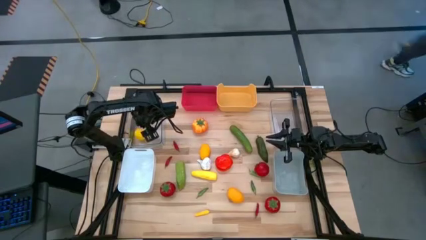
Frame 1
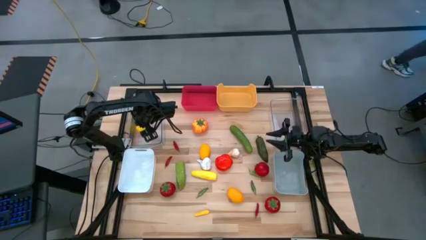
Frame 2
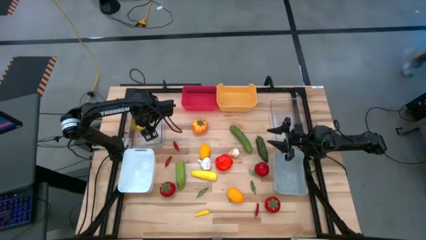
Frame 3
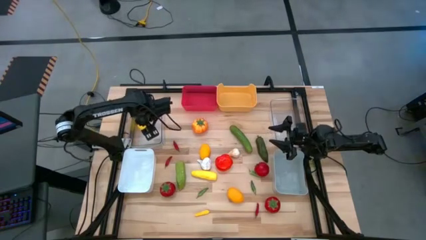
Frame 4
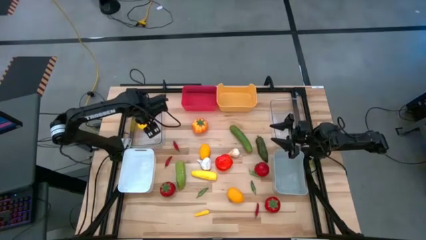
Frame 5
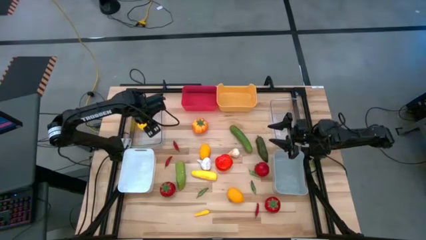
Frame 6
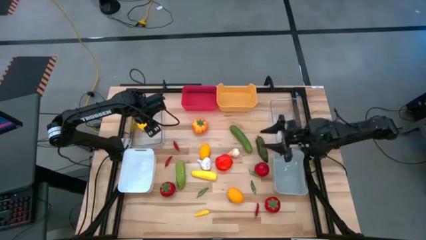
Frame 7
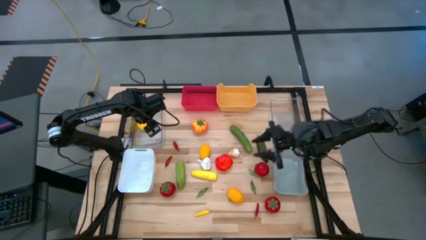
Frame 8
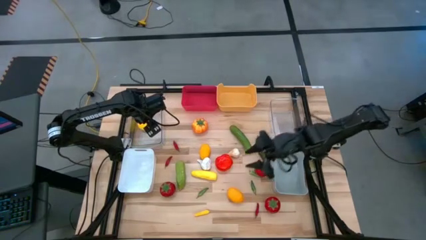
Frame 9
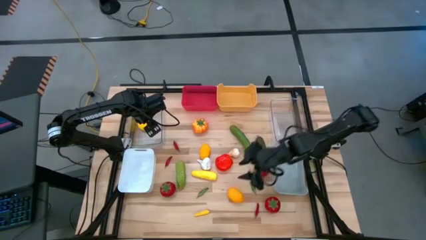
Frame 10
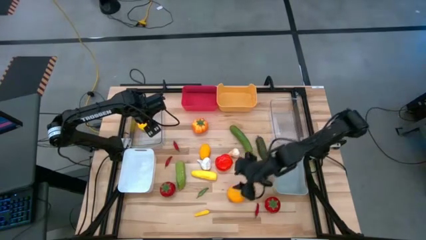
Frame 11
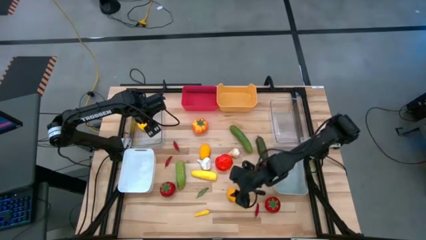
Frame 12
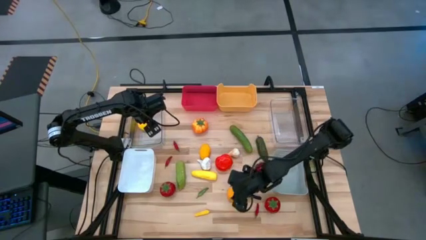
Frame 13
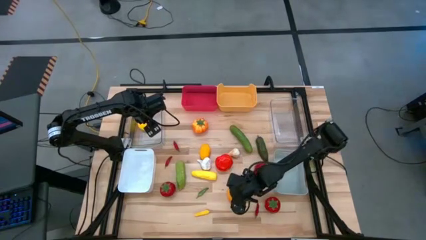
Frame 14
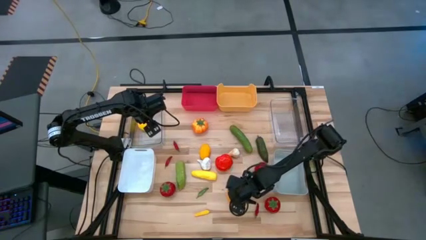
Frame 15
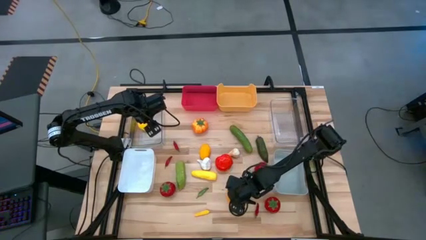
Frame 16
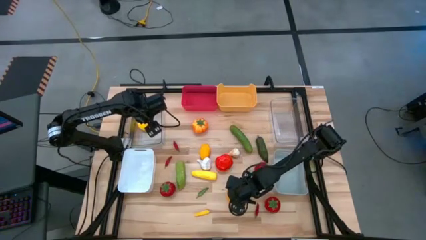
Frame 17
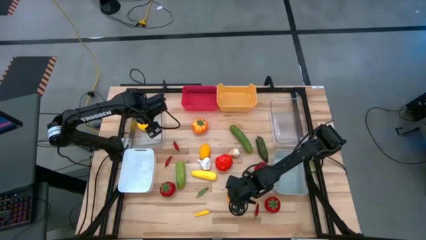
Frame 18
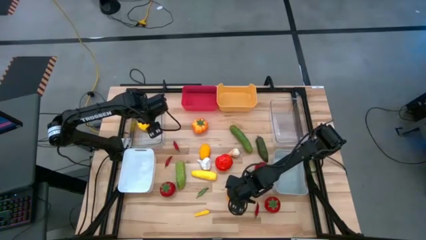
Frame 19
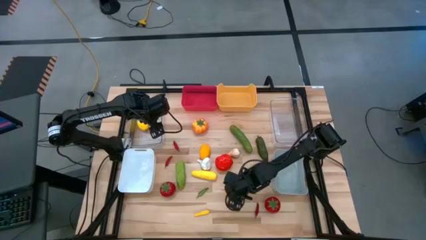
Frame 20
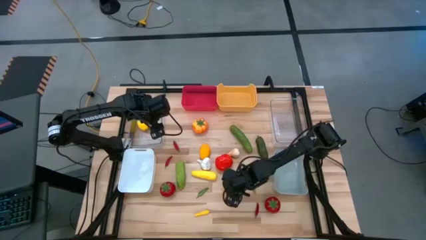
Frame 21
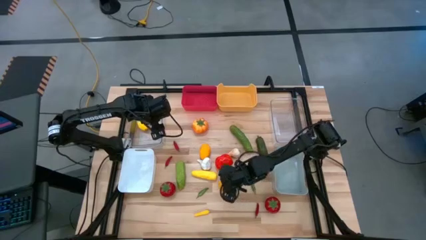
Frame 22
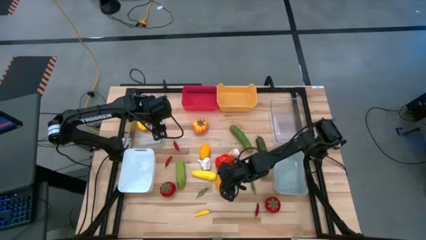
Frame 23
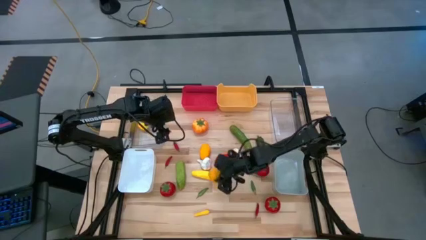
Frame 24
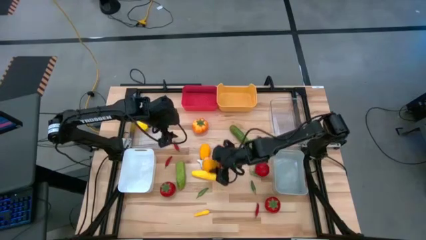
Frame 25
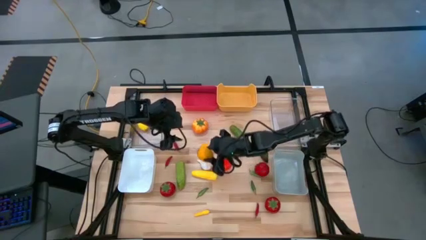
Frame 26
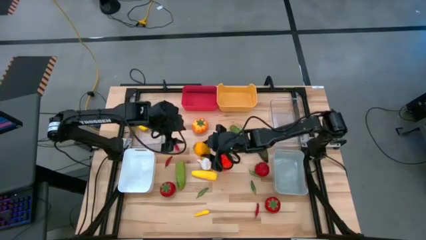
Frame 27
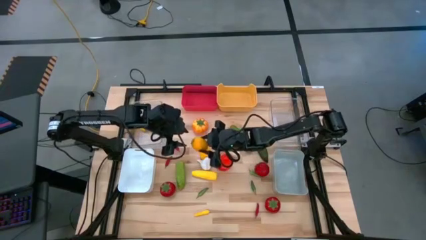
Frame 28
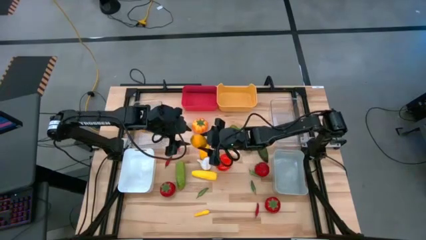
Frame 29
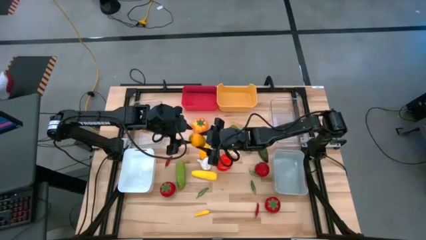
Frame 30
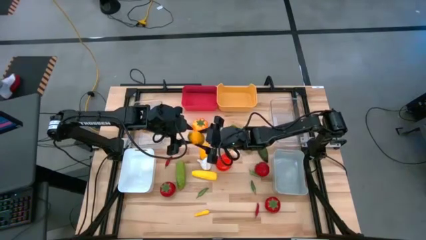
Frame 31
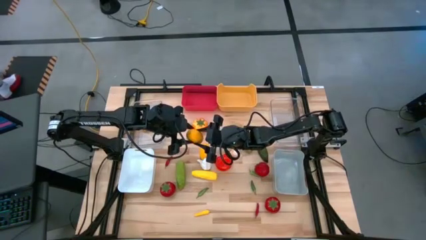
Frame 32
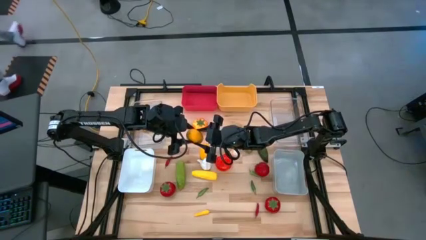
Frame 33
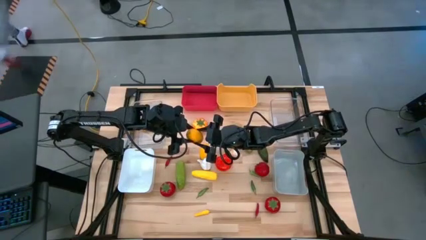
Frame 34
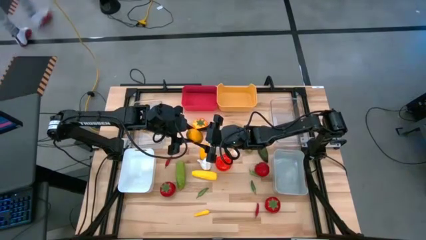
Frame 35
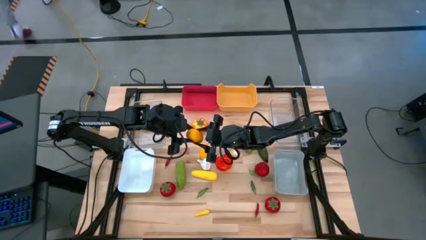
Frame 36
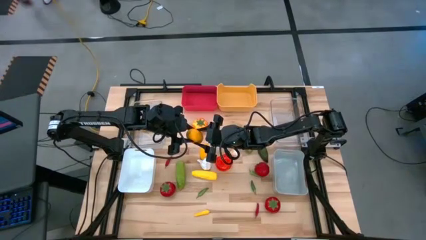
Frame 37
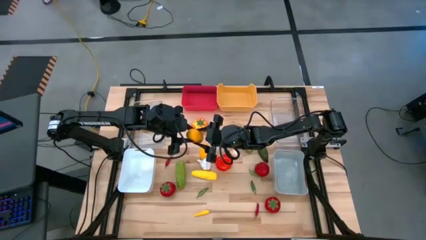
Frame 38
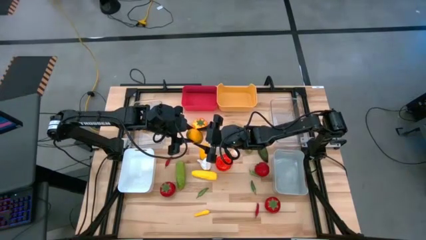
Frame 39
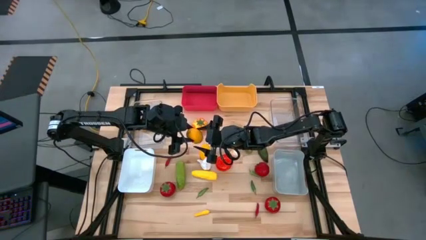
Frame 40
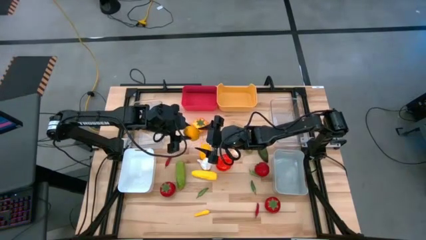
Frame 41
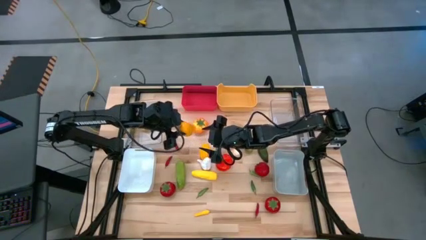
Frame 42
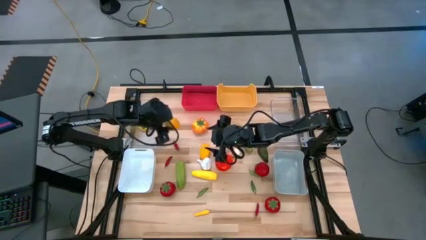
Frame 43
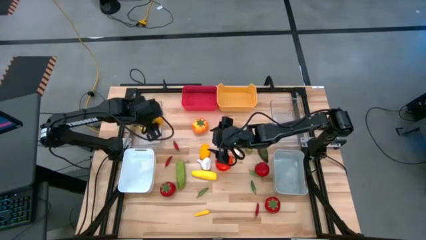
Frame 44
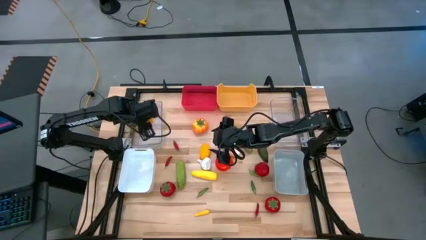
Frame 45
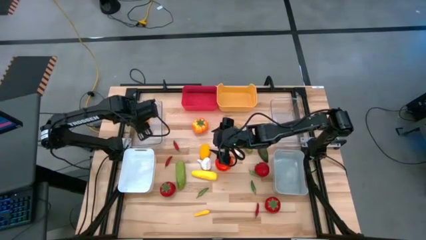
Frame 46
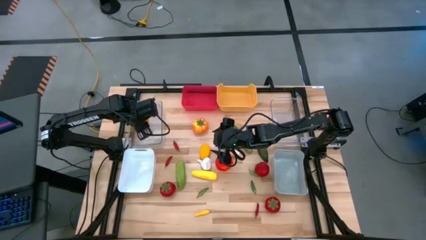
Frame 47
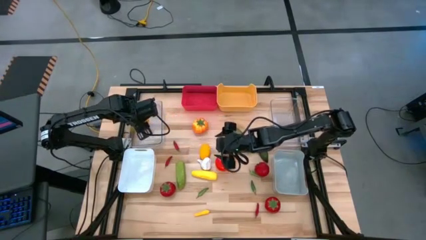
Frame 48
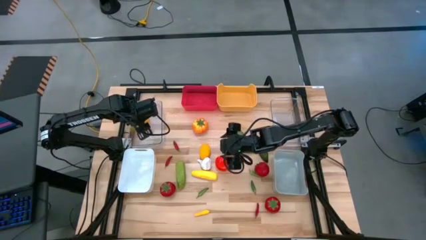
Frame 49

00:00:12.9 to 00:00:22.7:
Task: Sort produce into baskets
Put the yellow lemon into the left transparent bin

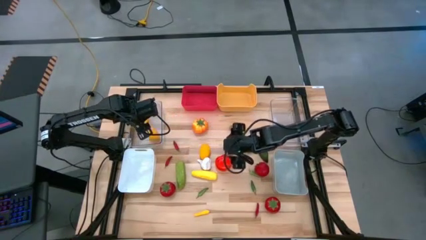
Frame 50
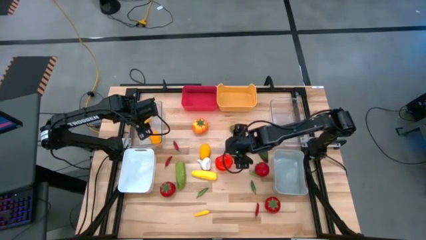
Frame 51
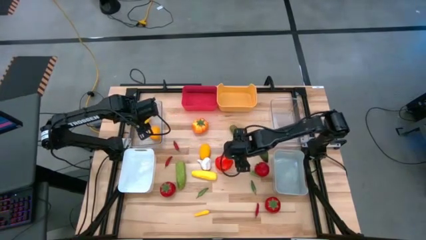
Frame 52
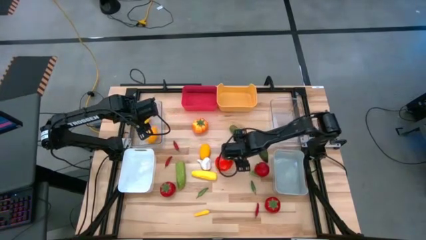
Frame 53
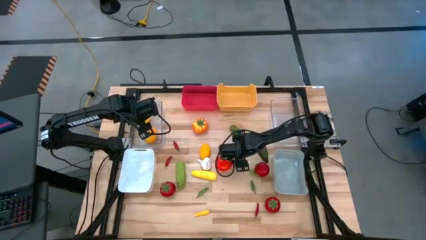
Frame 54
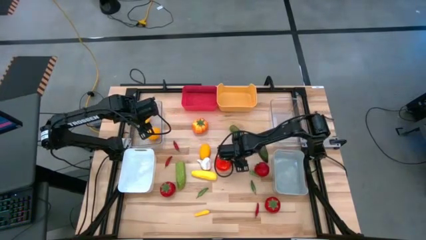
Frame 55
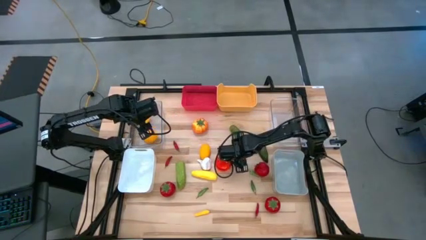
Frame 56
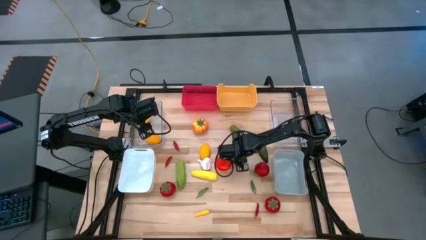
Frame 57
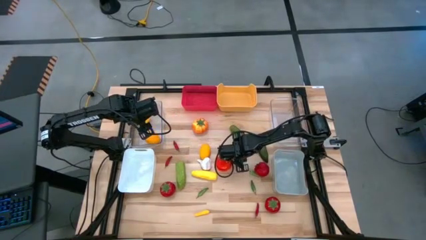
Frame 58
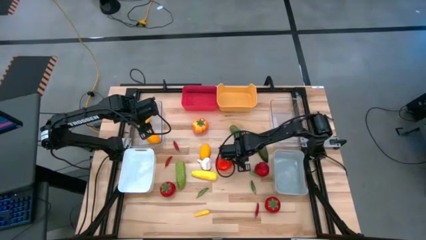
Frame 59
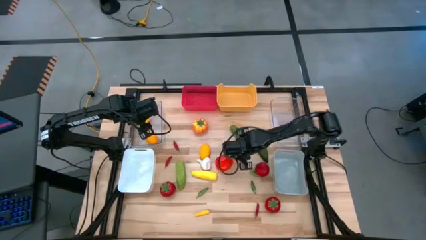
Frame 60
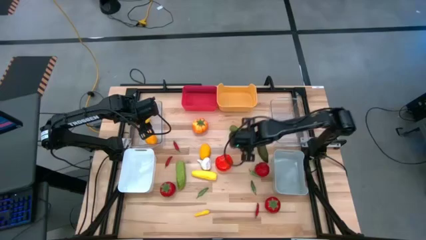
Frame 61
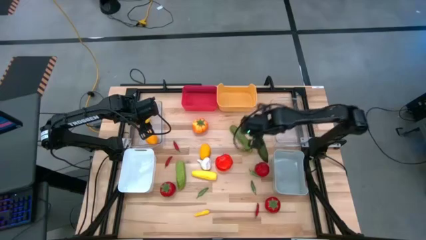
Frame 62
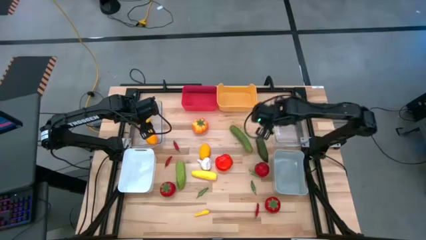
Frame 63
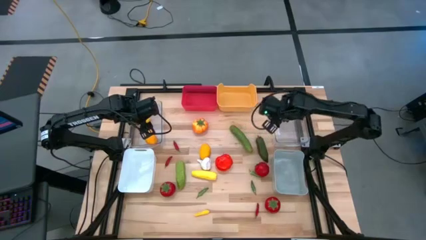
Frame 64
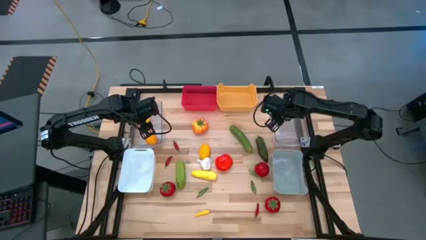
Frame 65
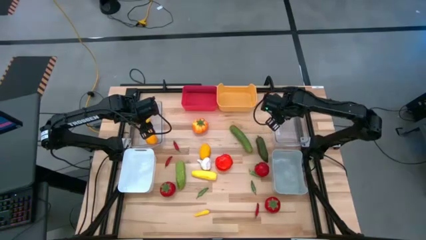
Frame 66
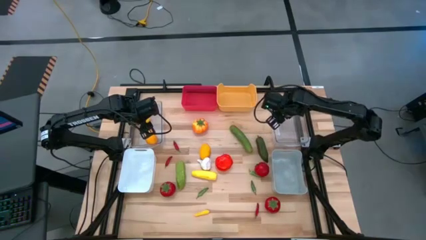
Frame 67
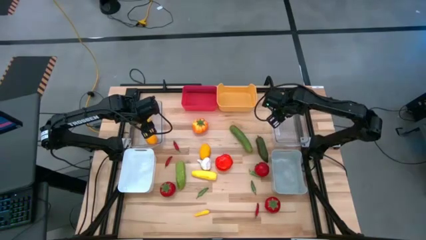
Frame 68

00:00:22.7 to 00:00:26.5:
Put the white garlic into the right transparent bin

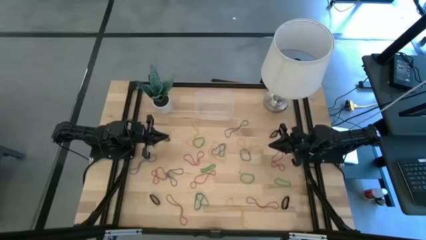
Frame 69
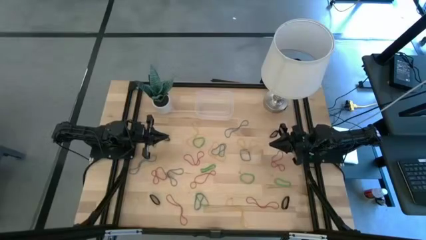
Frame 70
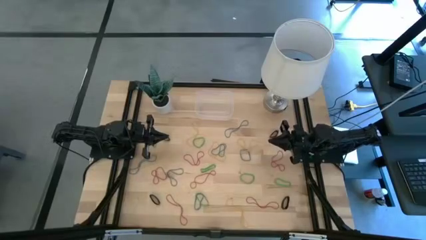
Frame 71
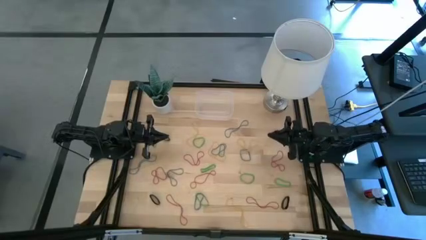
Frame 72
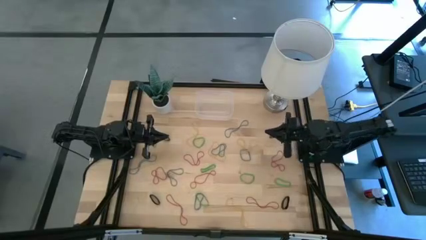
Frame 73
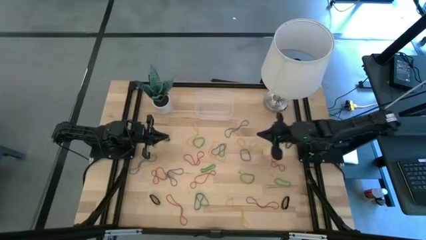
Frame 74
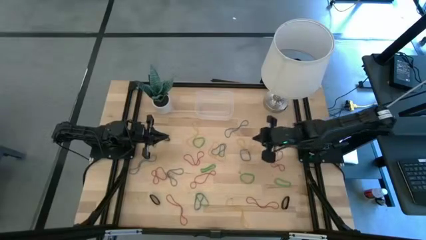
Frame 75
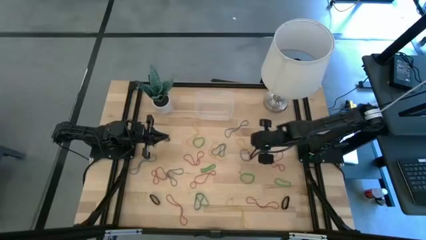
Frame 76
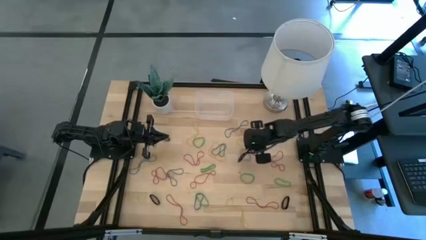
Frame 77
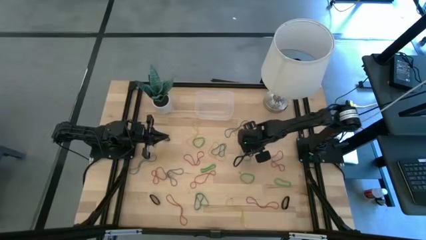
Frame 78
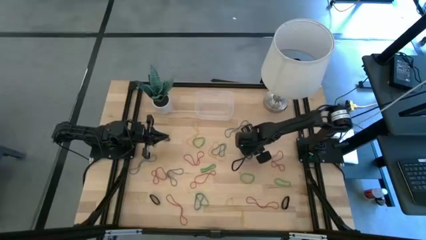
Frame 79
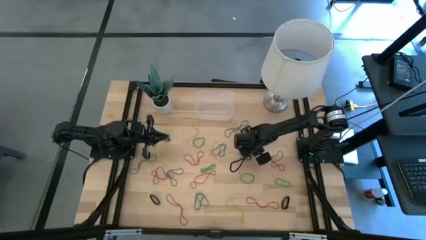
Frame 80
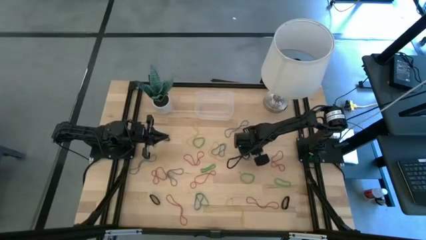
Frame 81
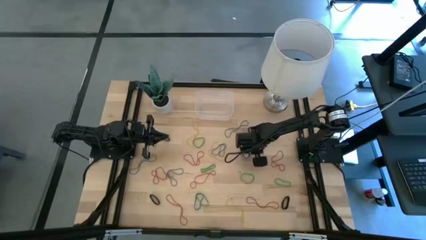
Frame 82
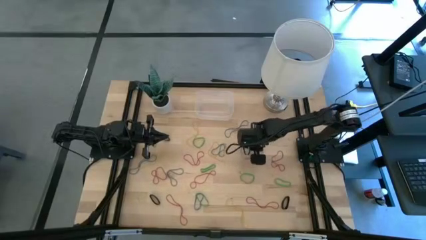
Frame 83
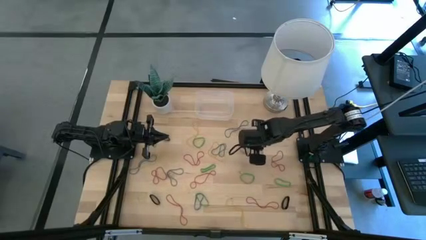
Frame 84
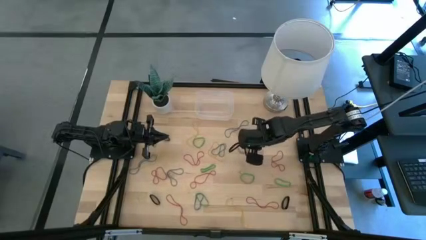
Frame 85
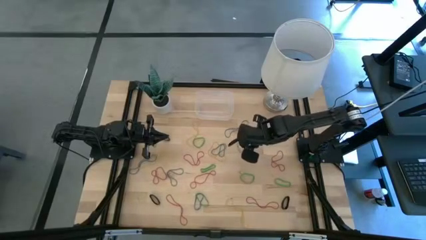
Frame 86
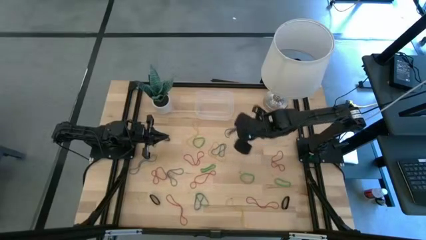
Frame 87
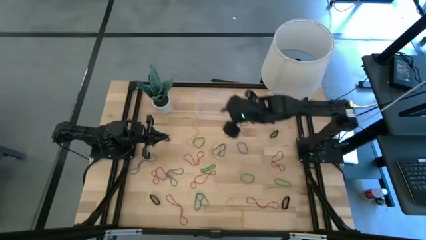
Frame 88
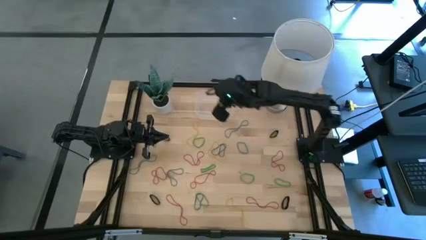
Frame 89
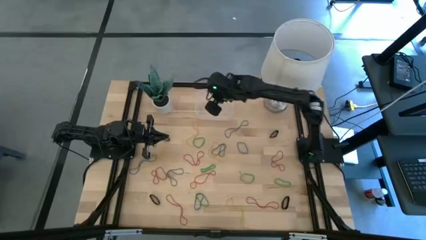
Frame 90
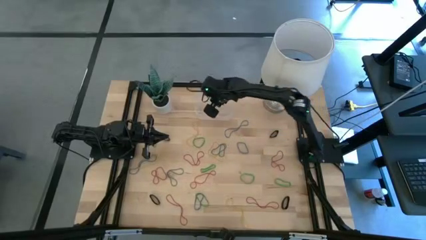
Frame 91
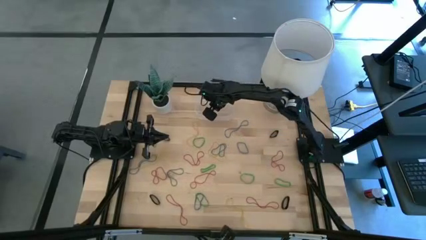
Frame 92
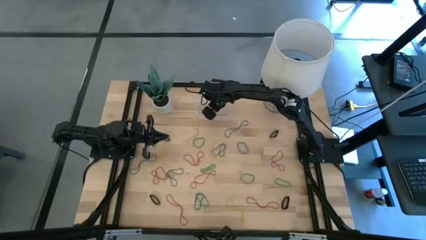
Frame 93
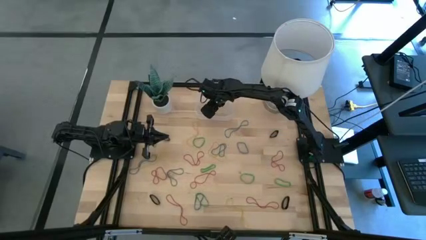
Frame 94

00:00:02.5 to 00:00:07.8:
Task: Pick and place rubber bands into bin
Put the yellow rubber band into the transparent bin
